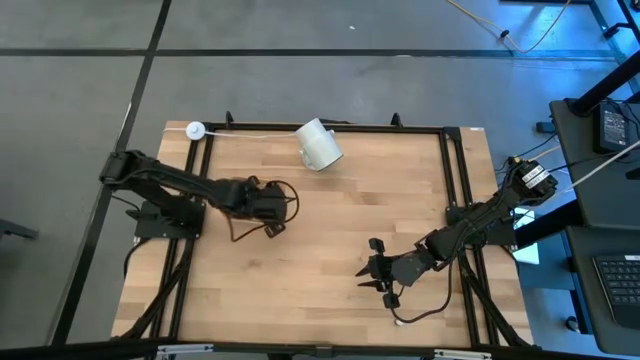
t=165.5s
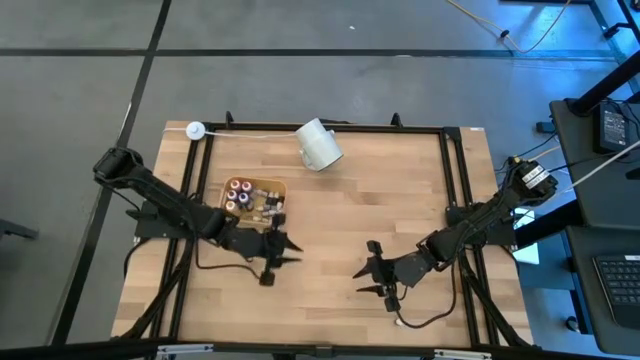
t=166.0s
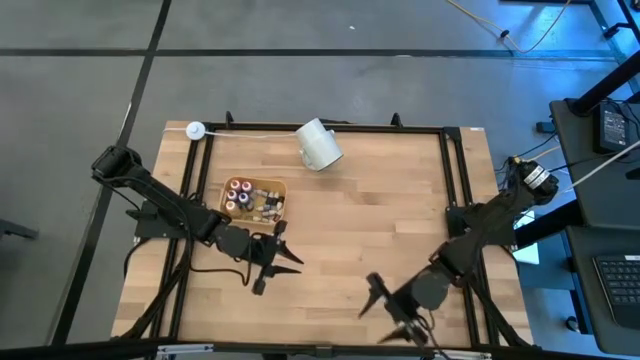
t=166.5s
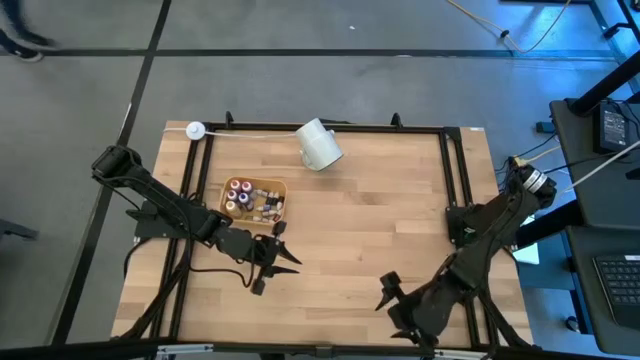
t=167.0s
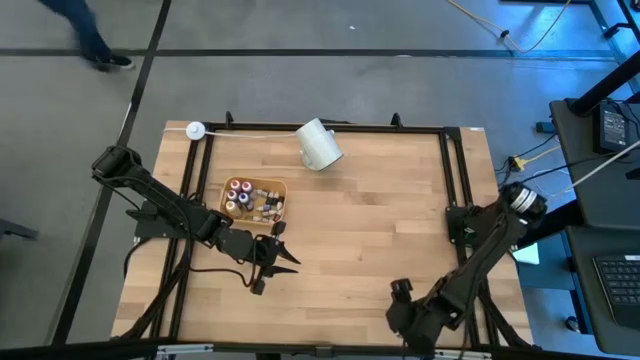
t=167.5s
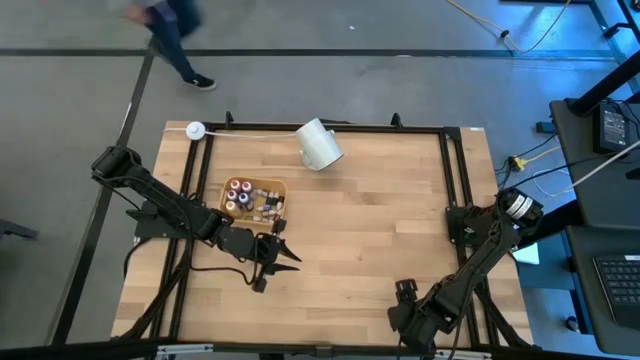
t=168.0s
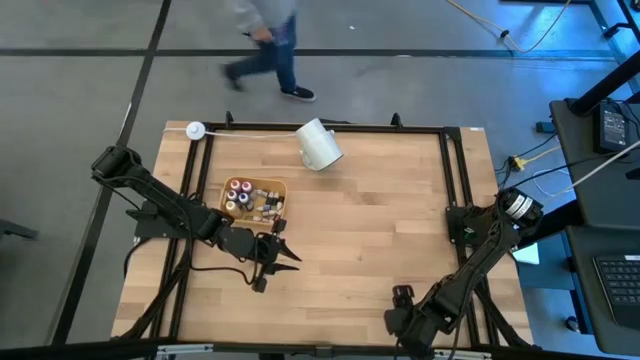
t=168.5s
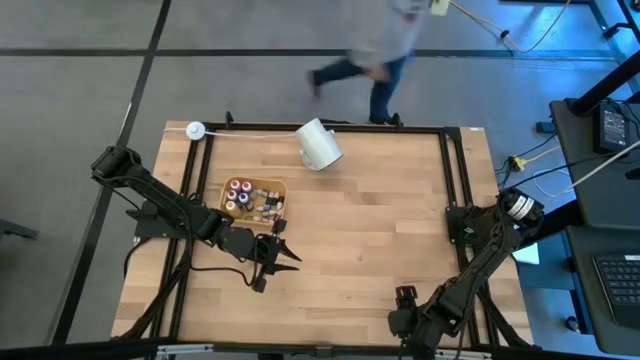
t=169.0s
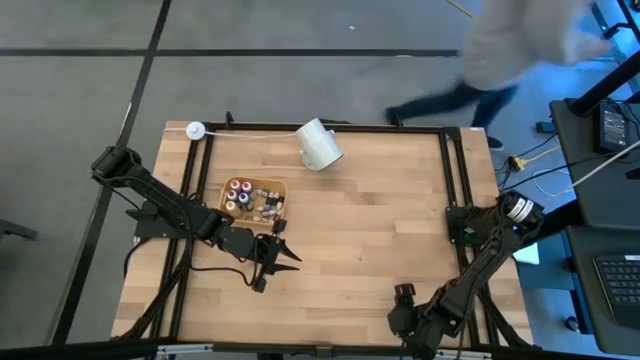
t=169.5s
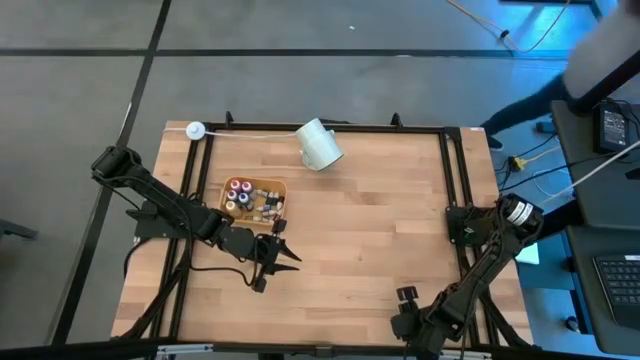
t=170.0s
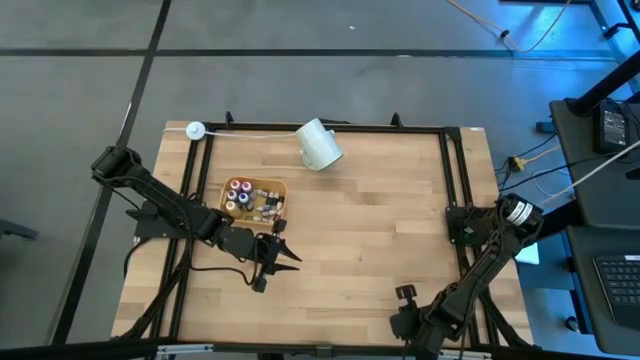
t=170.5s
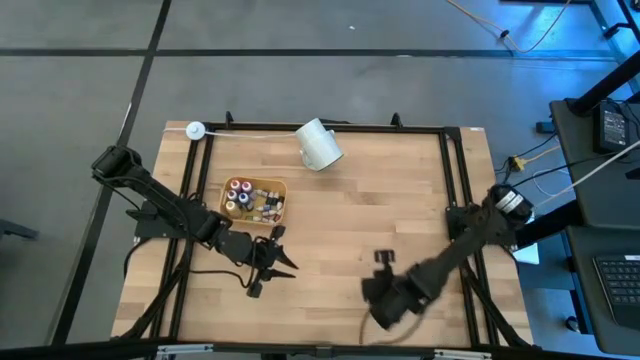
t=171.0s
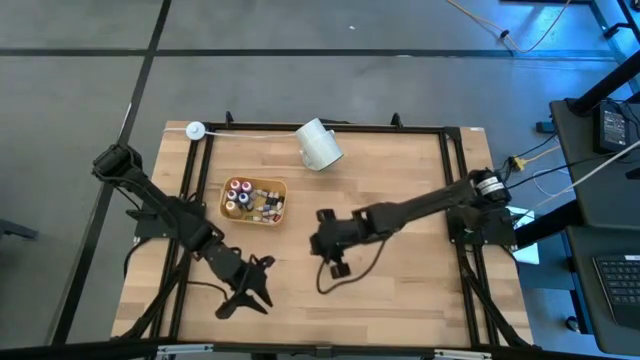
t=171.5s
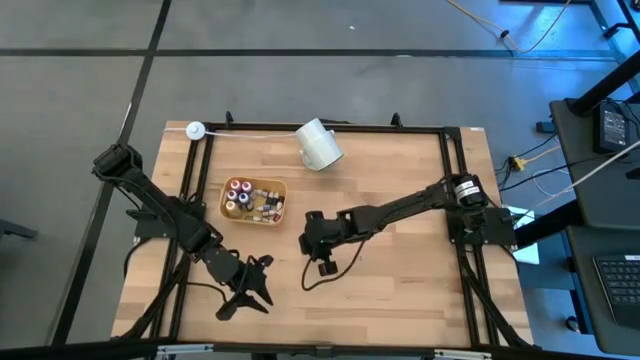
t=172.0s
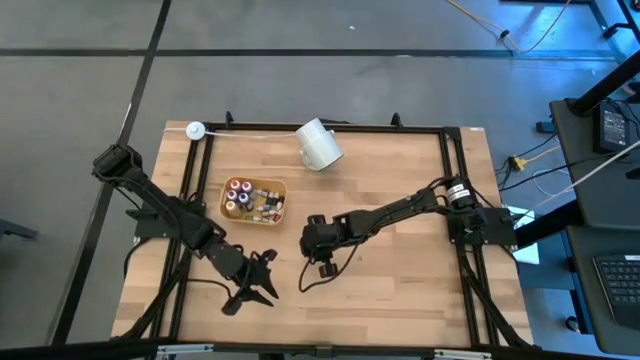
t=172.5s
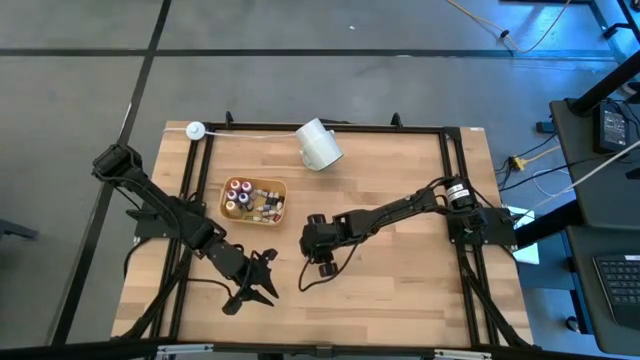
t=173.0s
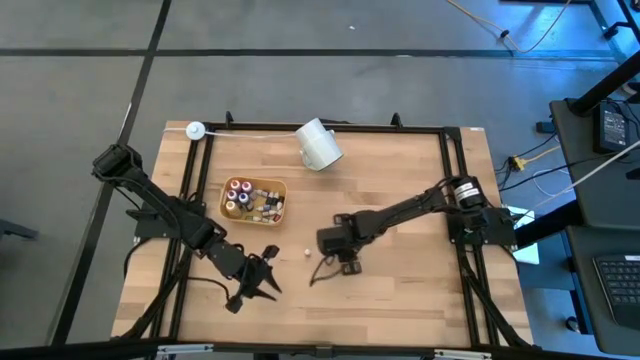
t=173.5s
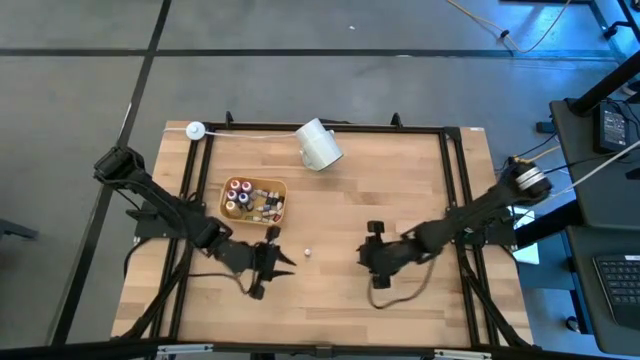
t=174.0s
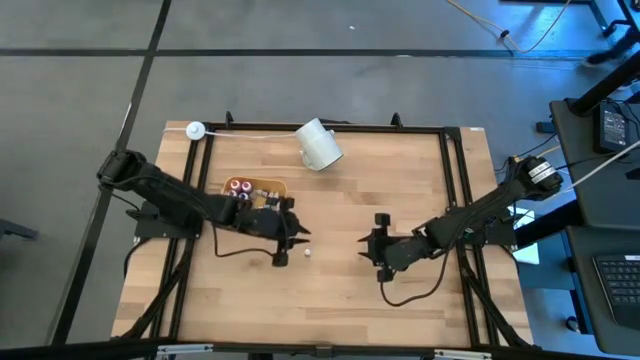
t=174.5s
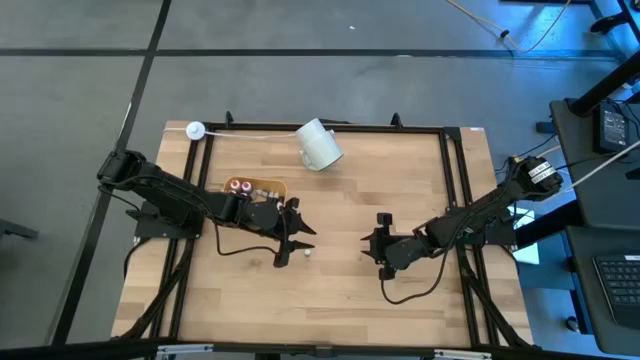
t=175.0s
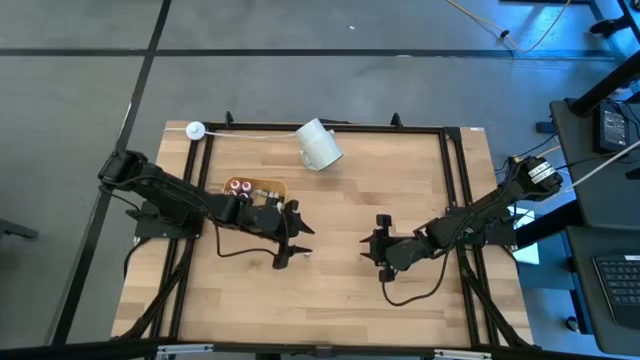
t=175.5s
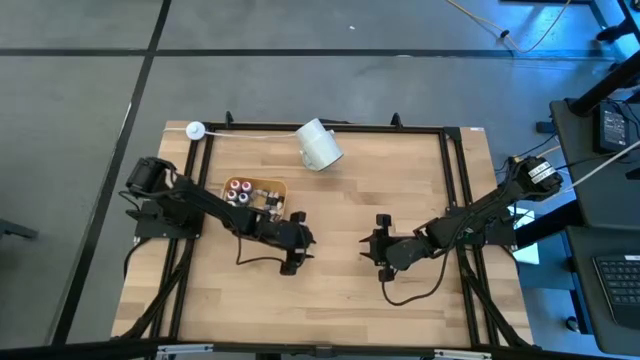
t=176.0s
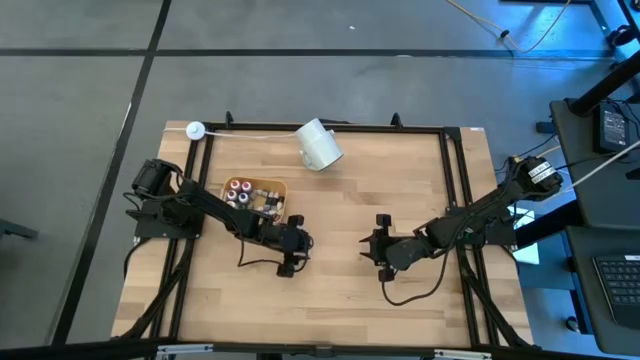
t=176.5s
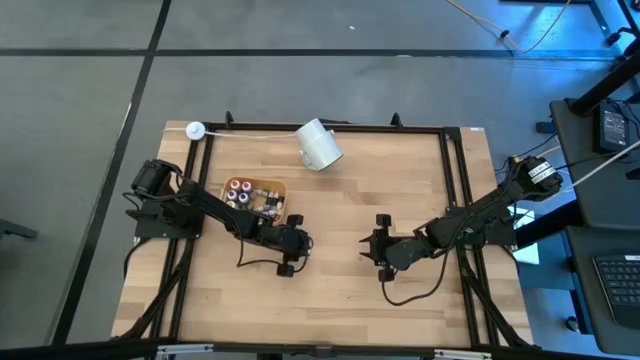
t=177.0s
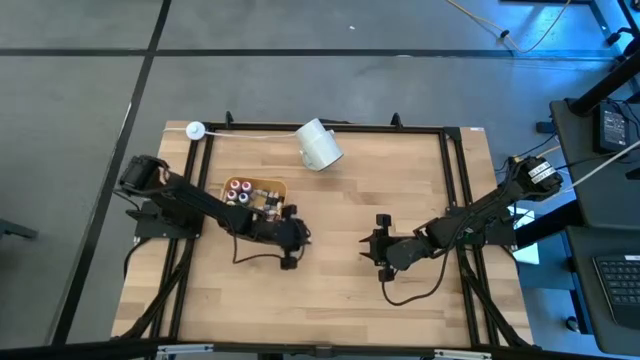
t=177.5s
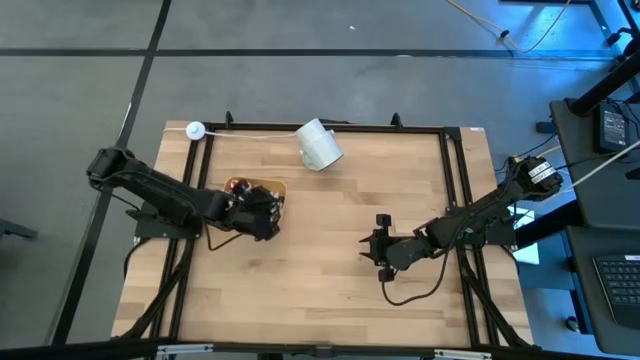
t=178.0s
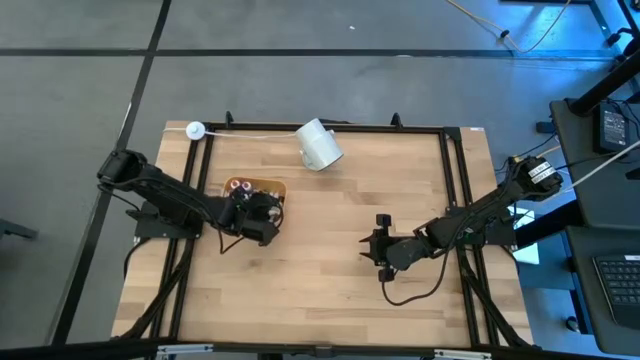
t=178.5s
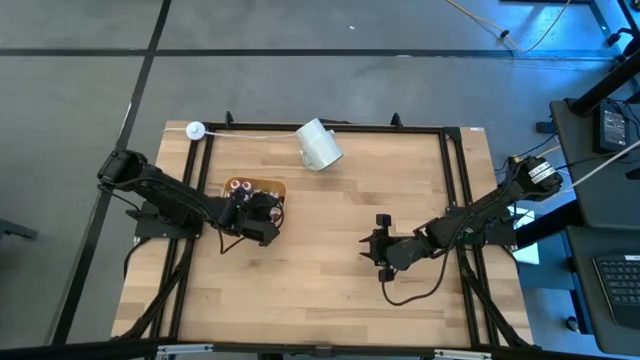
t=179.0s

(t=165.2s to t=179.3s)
Task: Pick & Place food coloring
Put the small brown food coloring bottle into the bin

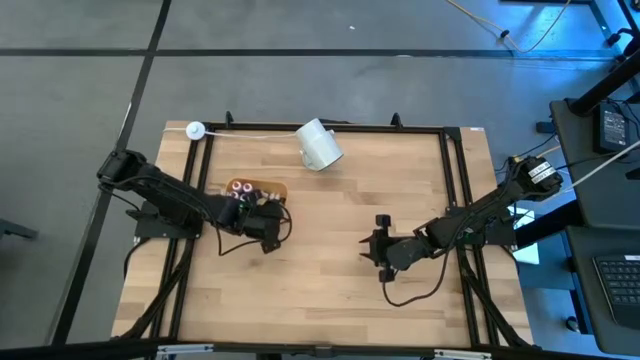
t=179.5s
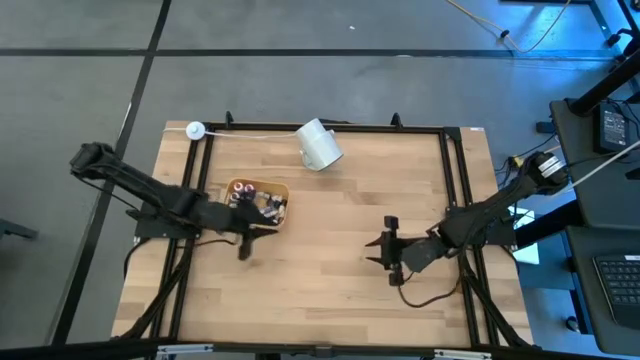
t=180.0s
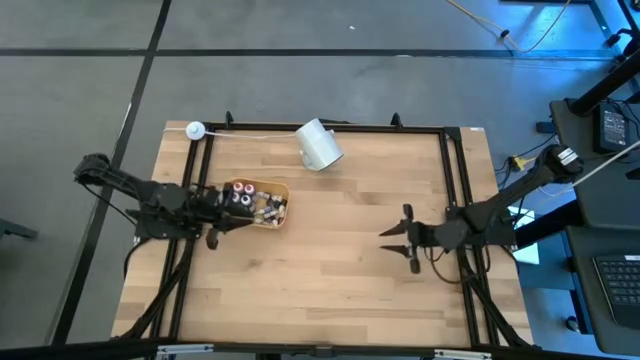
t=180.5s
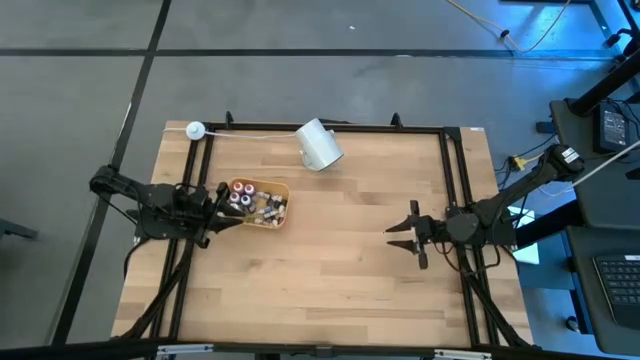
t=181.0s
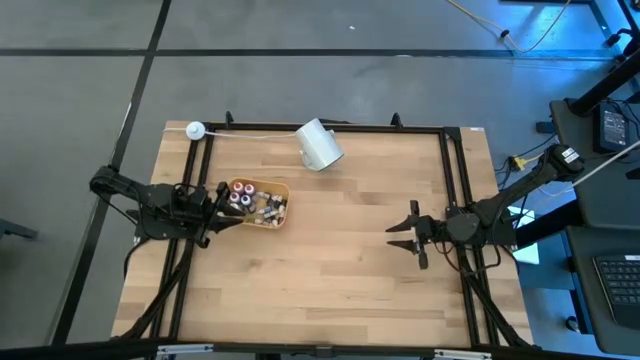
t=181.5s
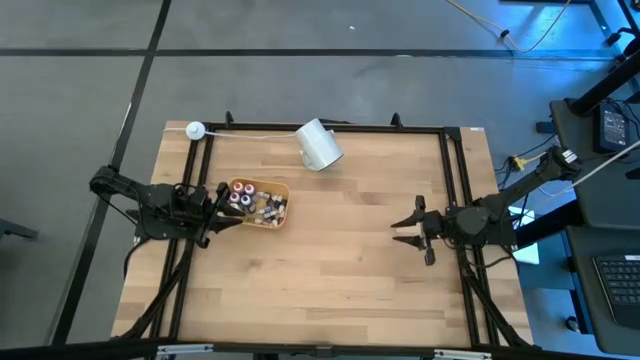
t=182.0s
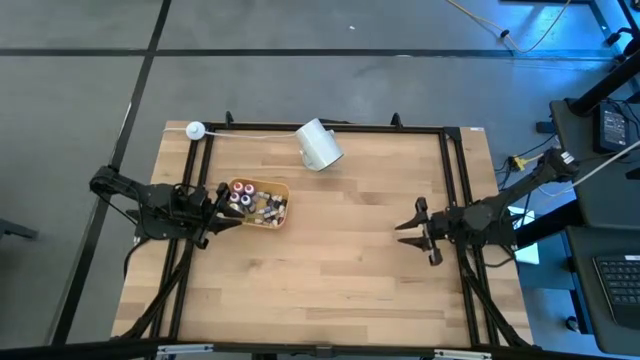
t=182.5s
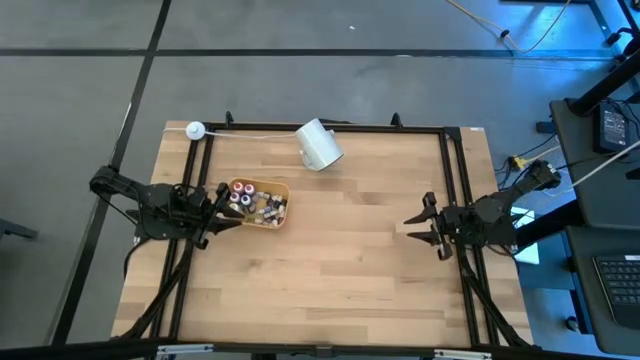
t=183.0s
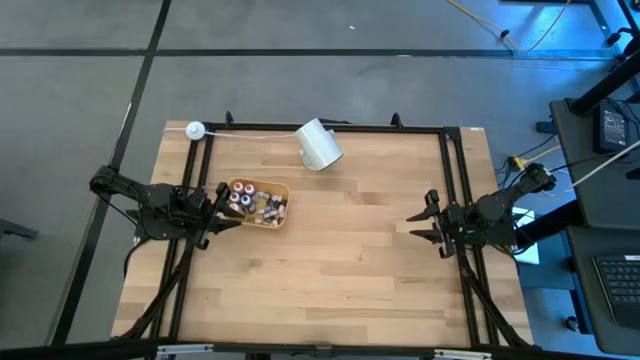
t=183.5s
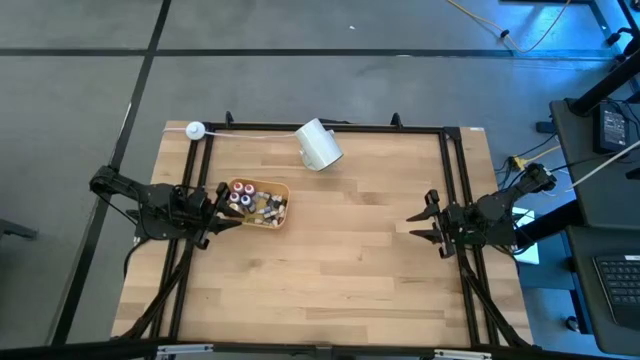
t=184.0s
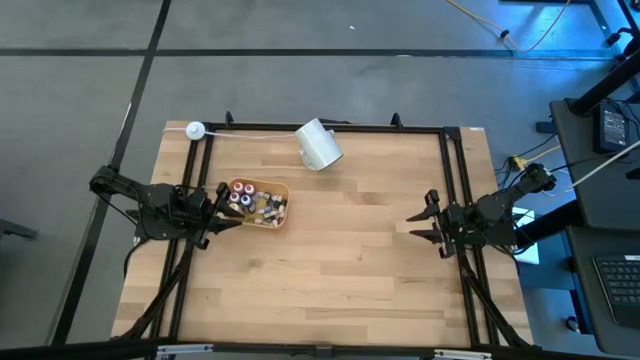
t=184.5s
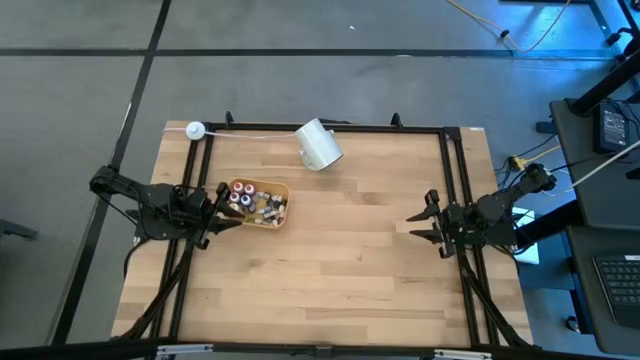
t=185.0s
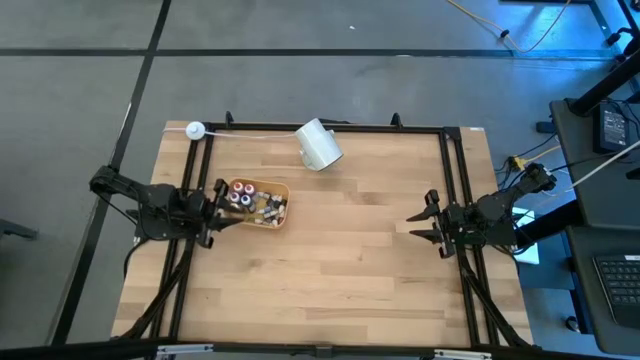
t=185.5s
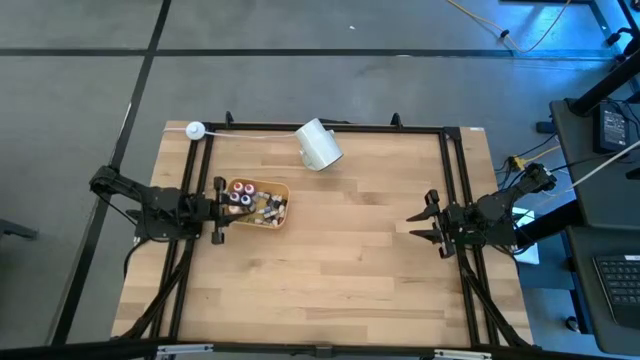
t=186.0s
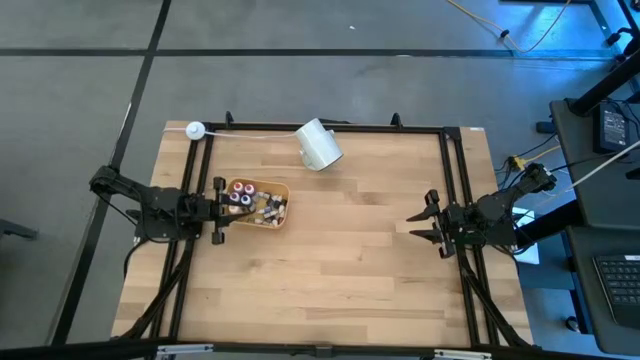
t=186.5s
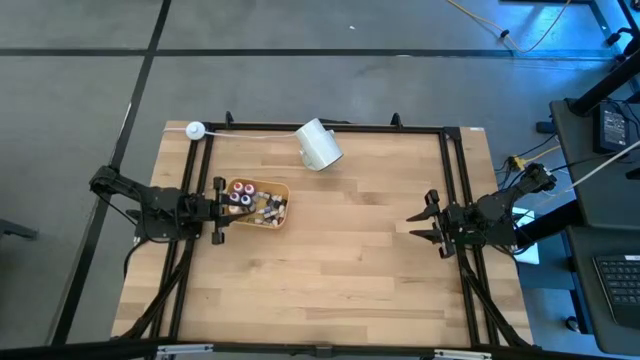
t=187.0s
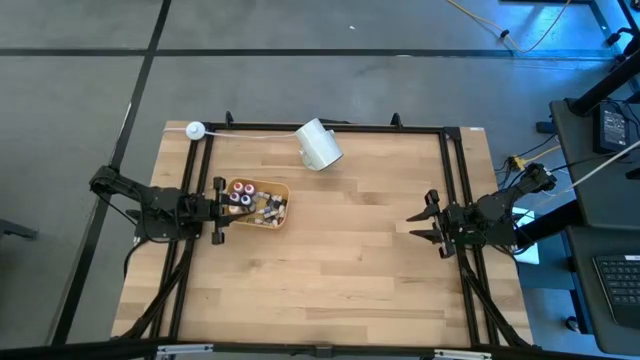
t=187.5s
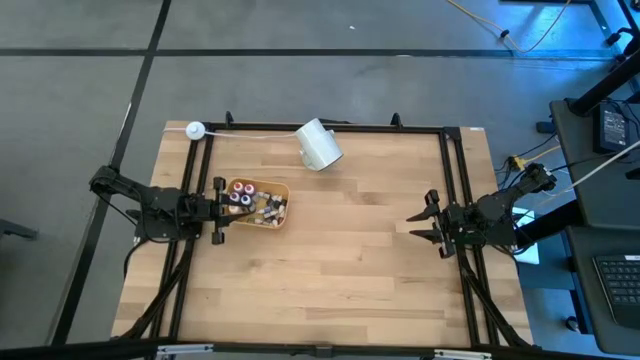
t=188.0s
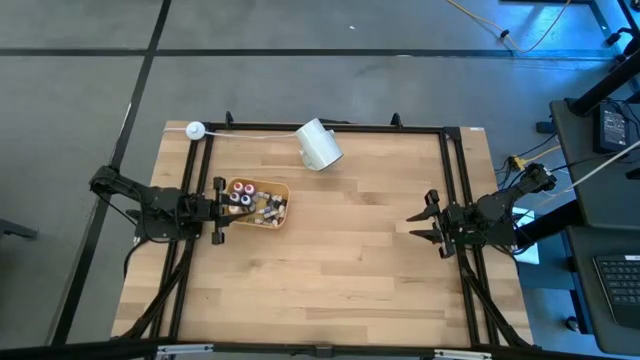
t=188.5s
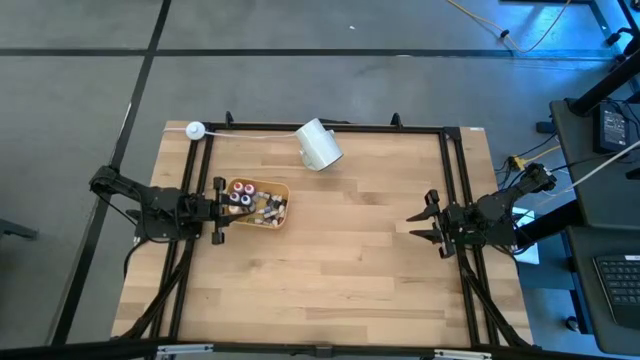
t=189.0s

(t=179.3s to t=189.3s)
Return to Home Position
